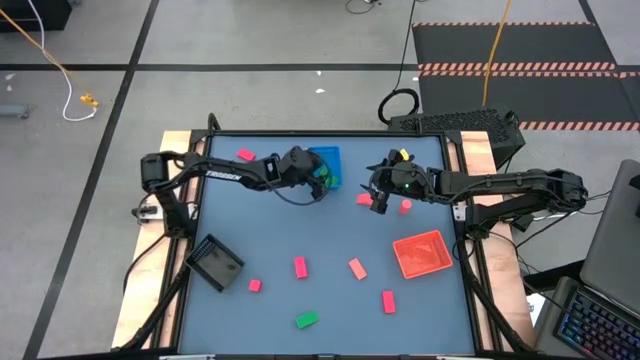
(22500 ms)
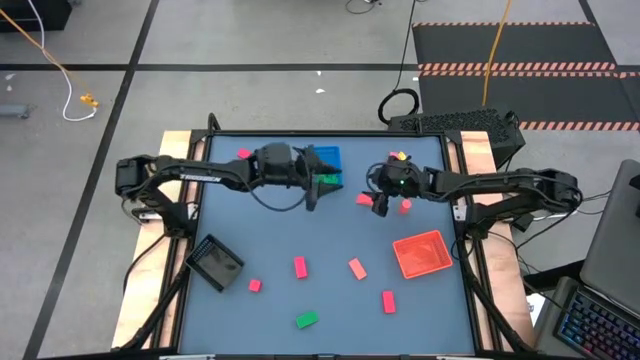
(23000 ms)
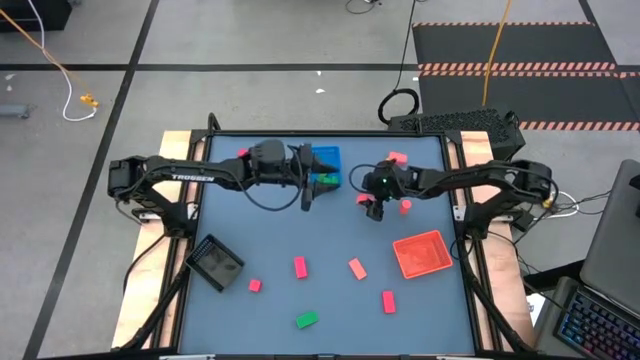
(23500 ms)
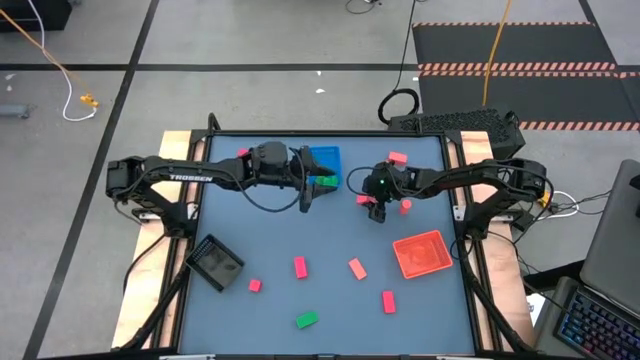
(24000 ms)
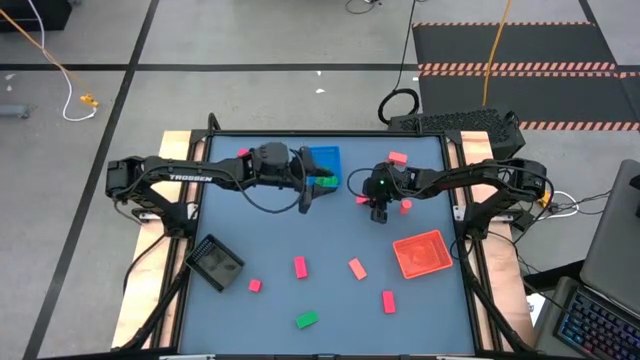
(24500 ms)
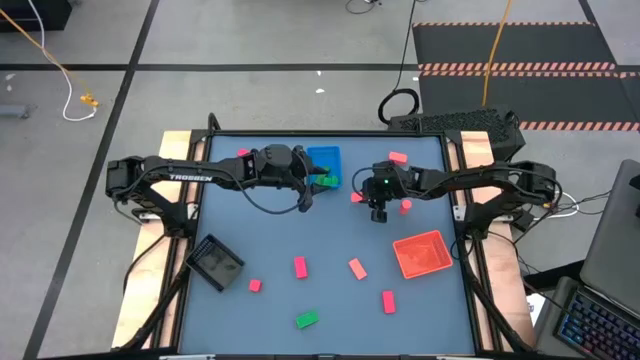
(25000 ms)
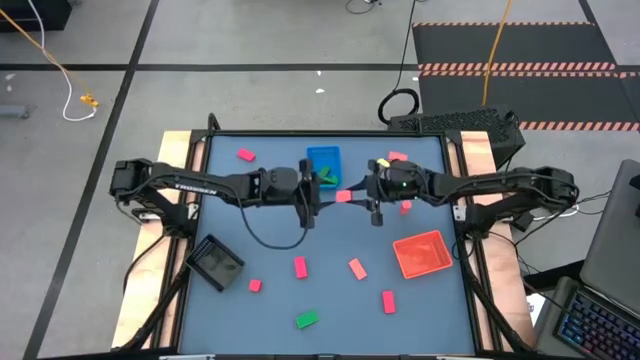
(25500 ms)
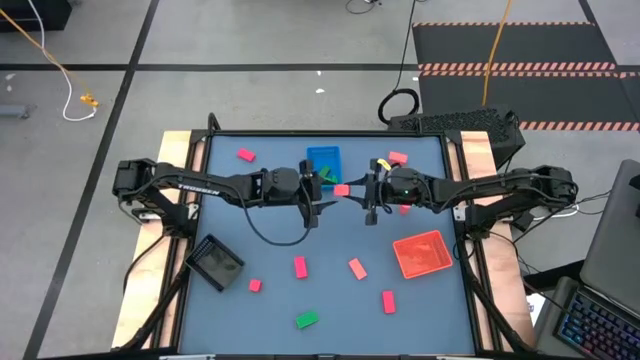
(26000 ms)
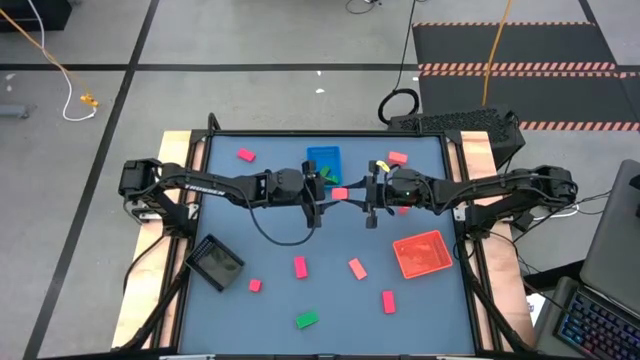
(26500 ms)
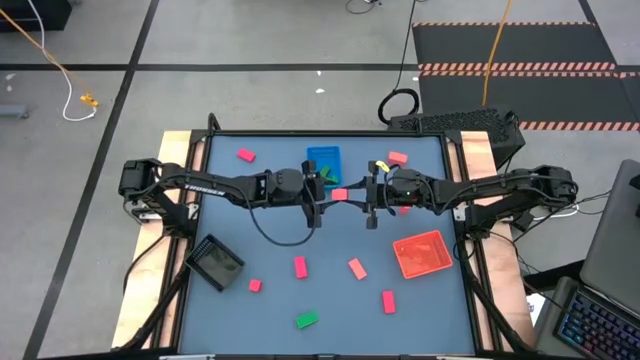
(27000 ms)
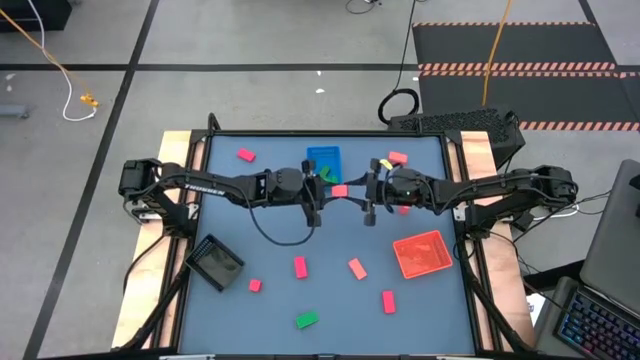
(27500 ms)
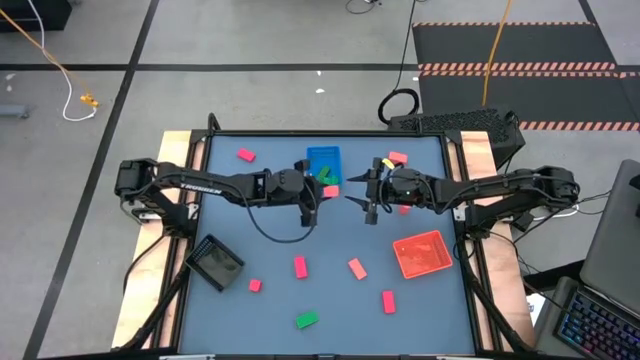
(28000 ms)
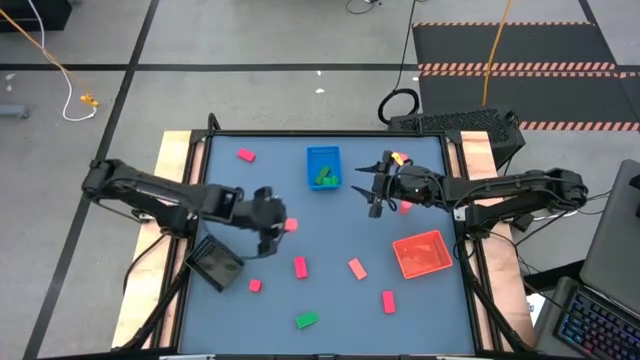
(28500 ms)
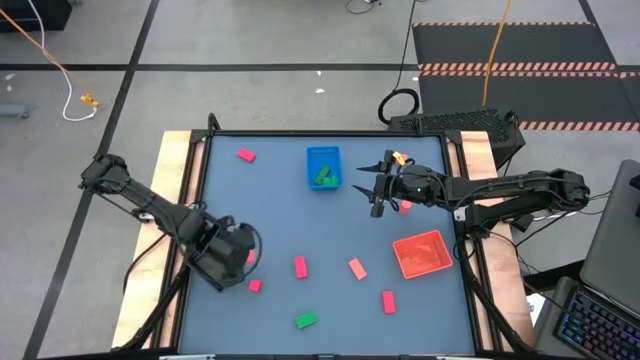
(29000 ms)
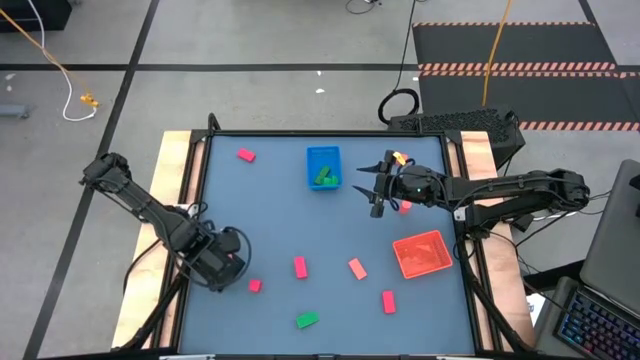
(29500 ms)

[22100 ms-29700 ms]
Task: Sort & place blocks by color
Put the orange block into the black bin

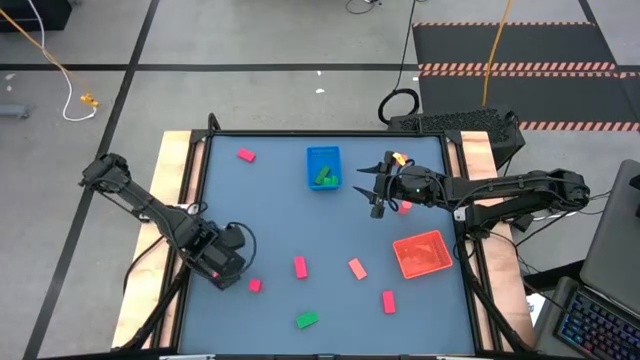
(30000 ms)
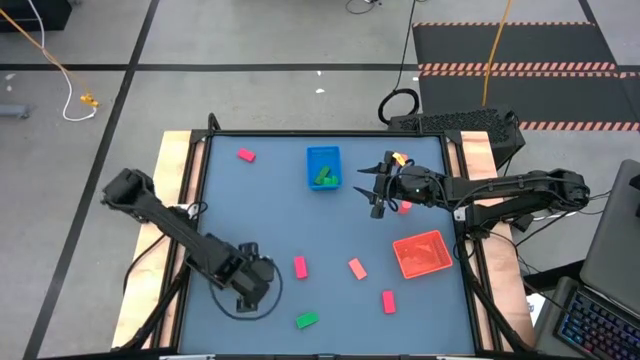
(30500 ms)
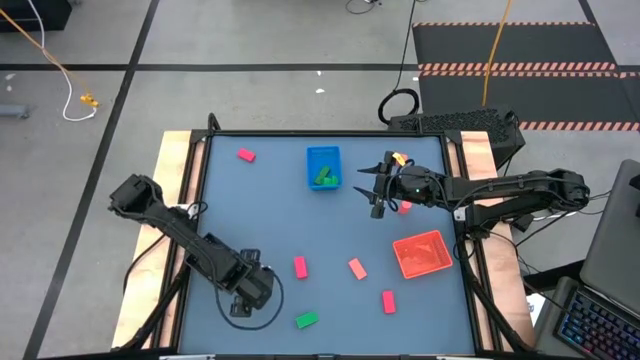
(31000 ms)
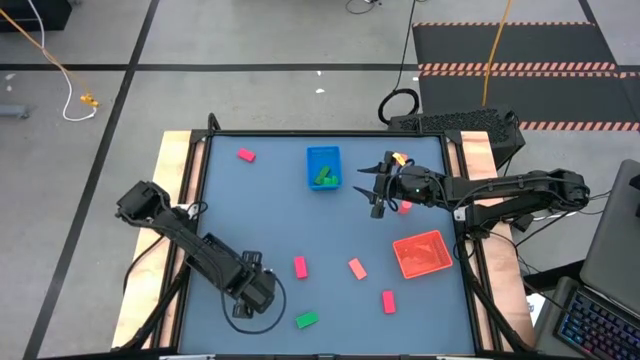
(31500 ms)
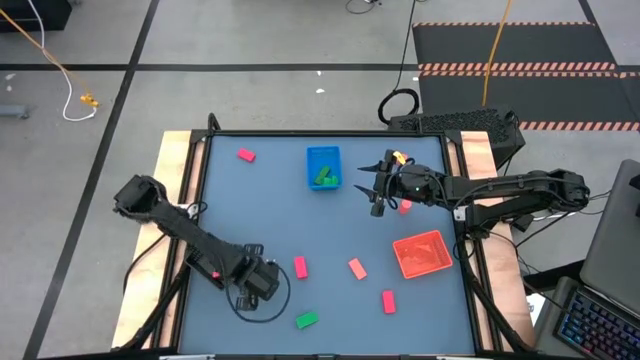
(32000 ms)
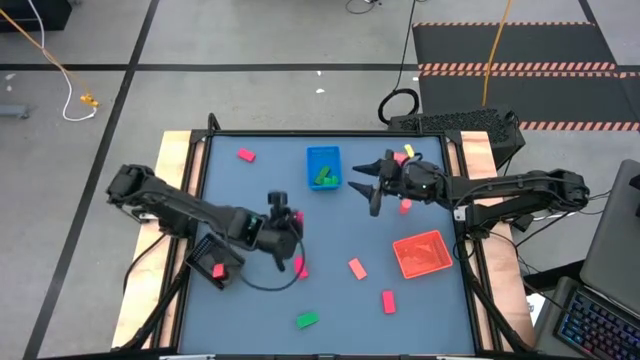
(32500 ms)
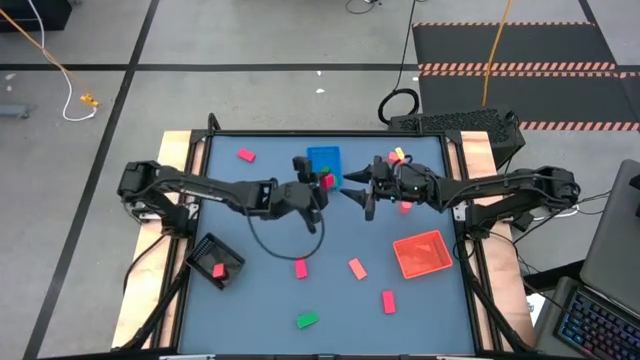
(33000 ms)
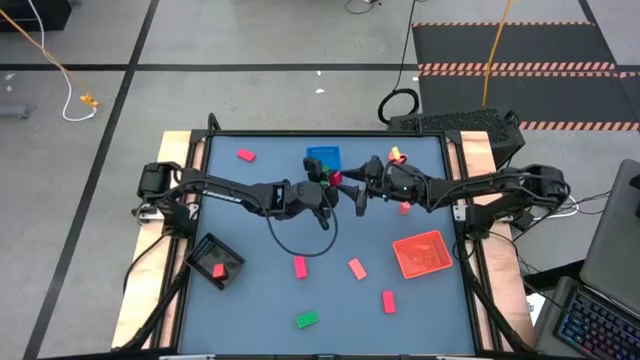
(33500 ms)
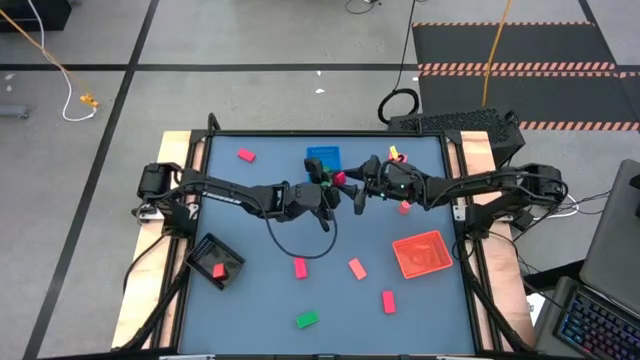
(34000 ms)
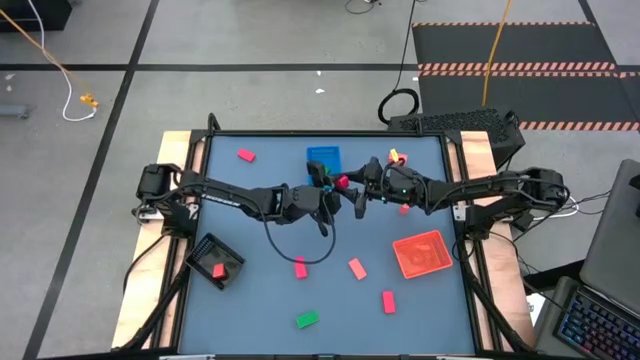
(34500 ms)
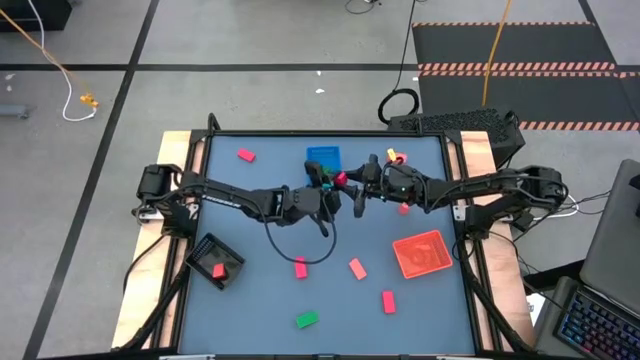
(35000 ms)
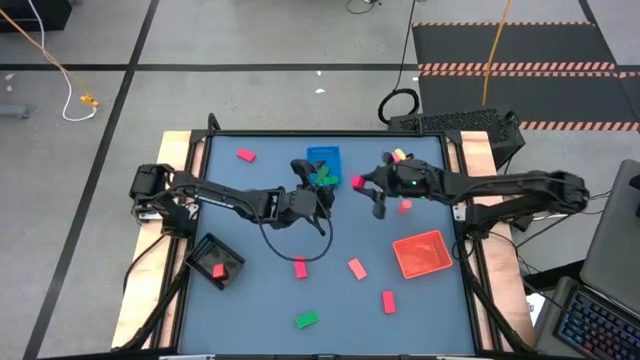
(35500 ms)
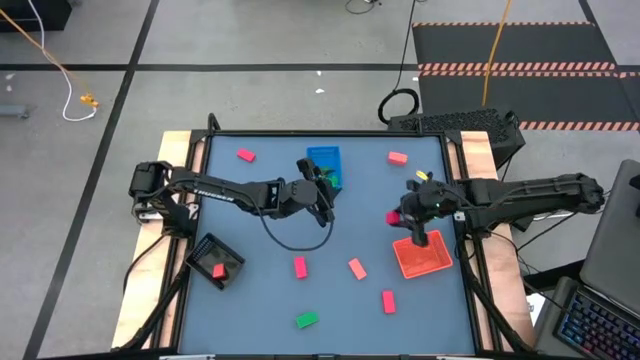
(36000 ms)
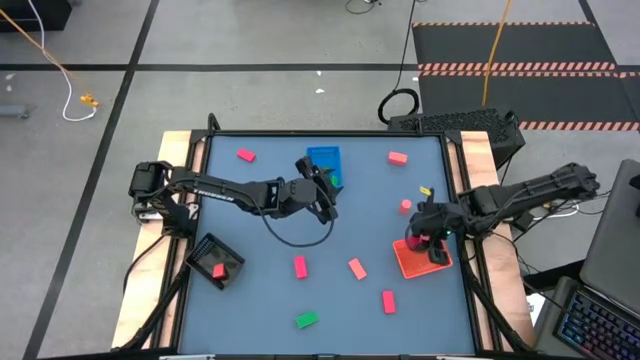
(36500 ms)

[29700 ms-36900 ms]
Put the red block into the orange bin

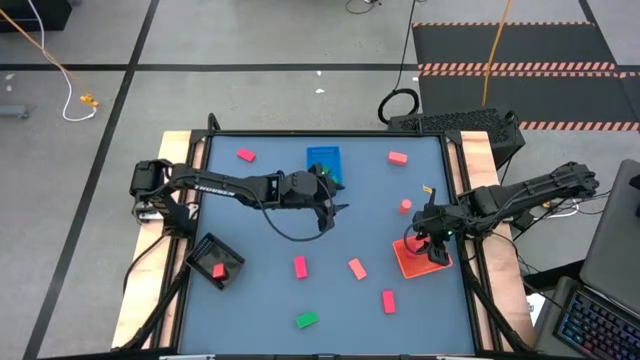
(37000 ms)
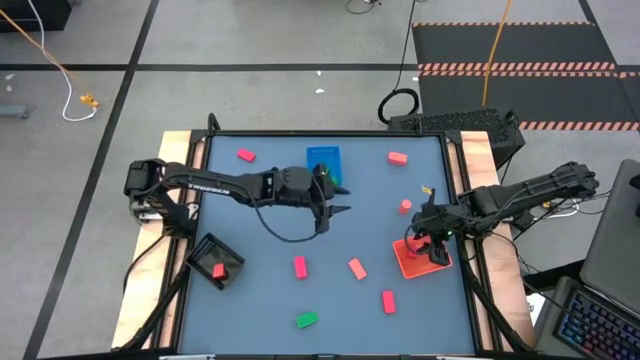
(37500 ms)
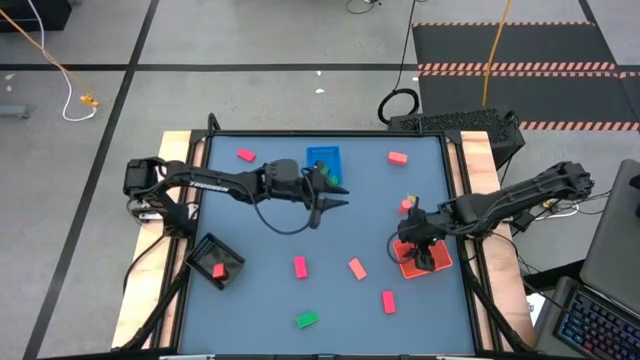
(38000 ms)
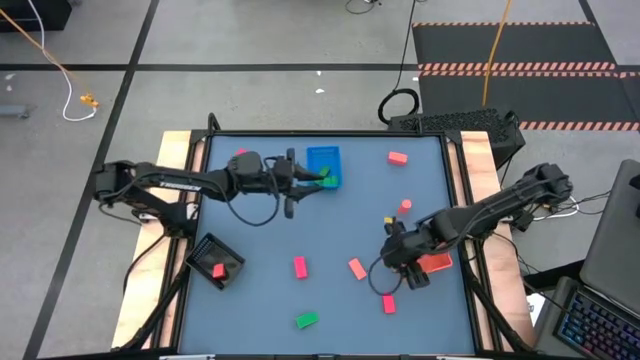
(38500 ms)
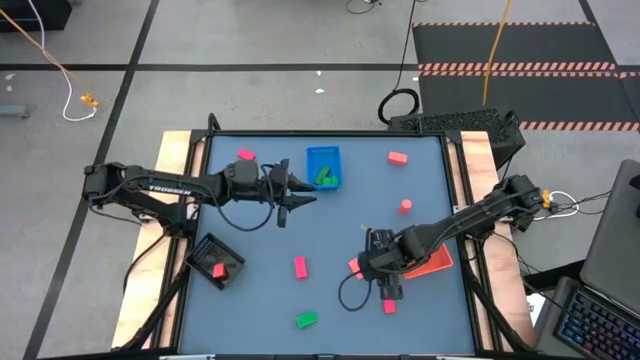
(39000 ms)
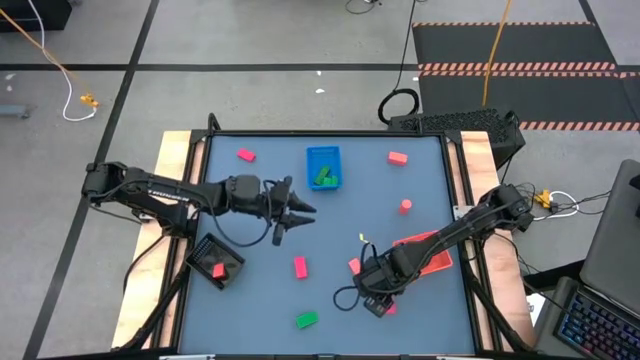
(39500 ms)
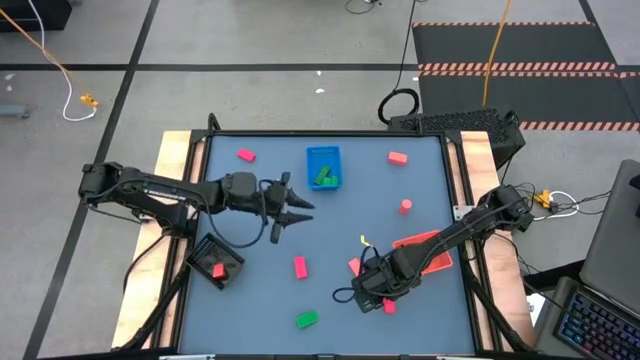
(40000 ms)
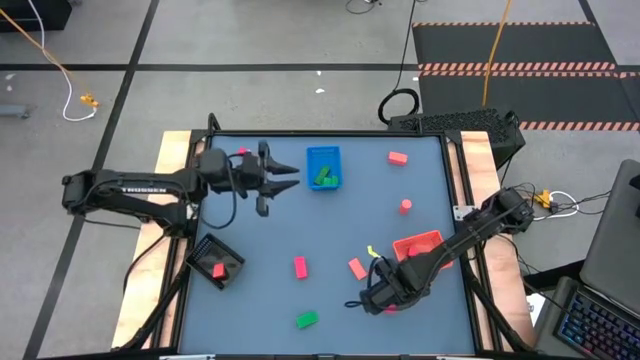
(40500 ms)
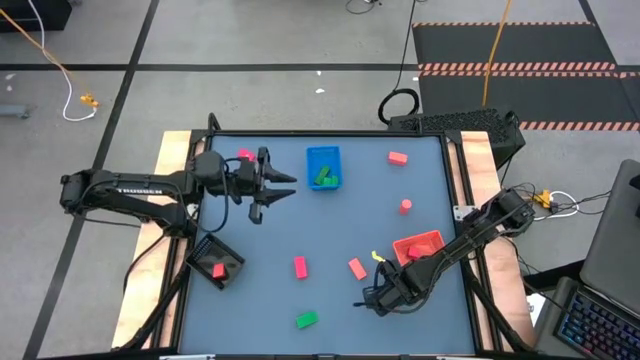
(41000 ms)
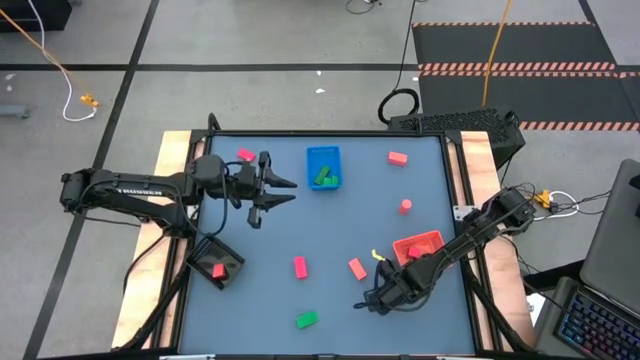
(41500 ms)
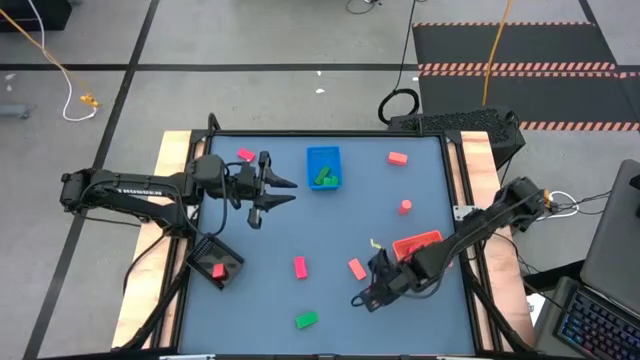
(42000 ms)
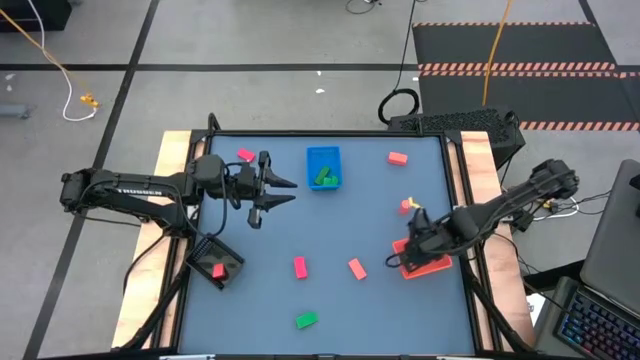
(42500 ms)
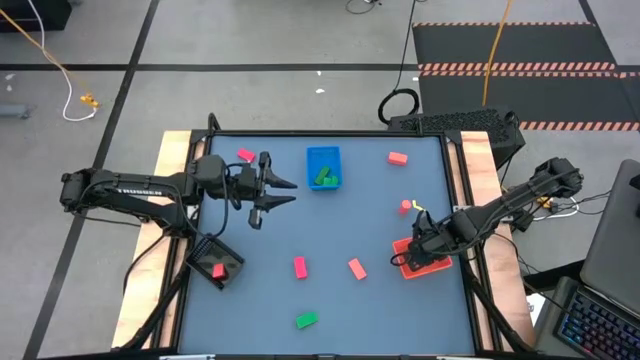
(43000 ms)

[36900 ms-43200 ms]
Put the red block into the orange bin

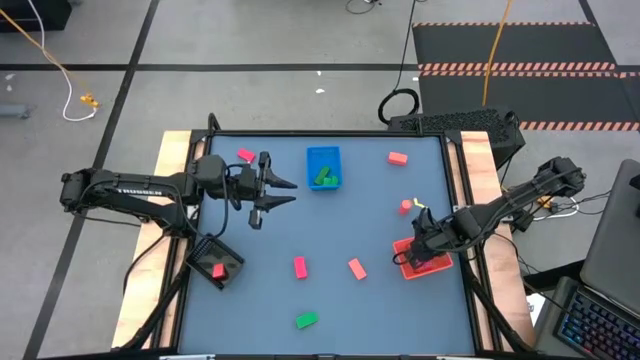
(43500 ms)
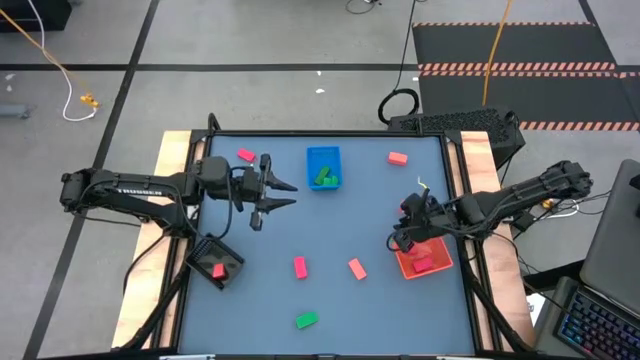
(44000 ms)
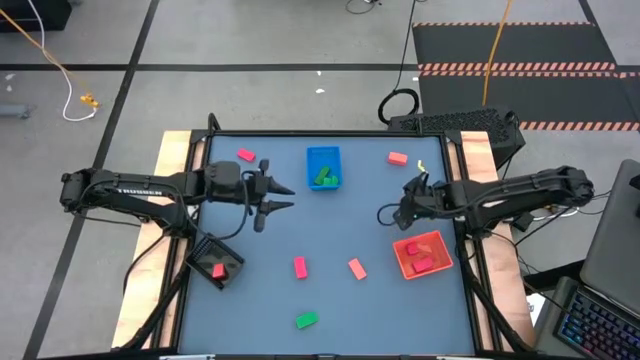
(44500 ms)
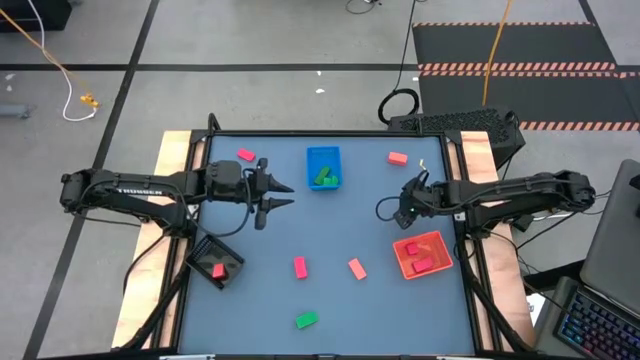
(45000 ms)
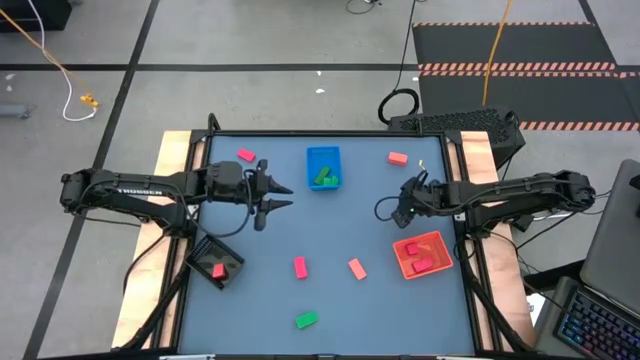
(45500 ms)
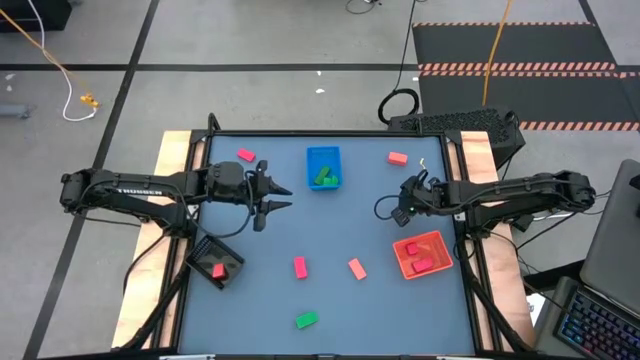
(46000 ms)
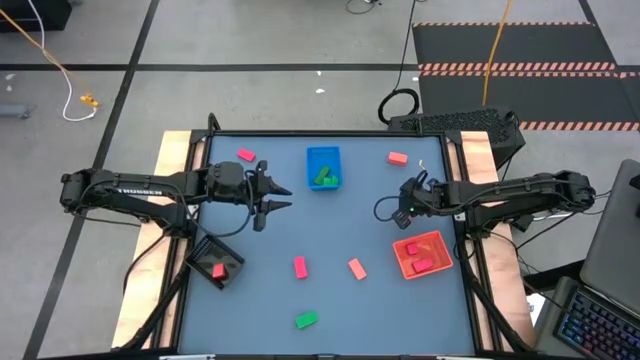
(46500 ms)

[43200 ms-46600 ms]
Put the orange block into the black bin
